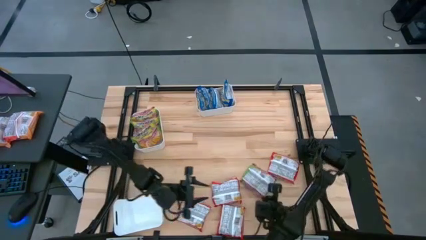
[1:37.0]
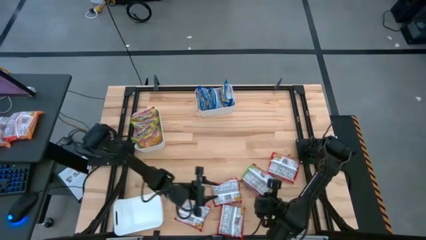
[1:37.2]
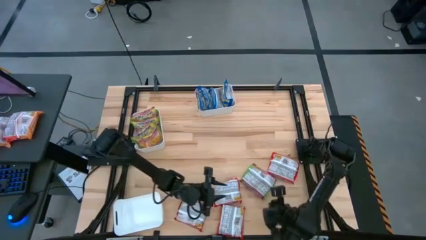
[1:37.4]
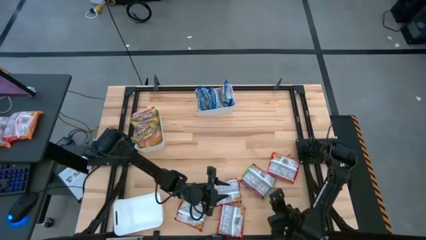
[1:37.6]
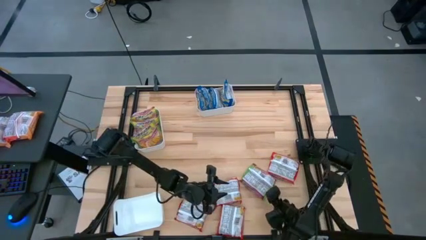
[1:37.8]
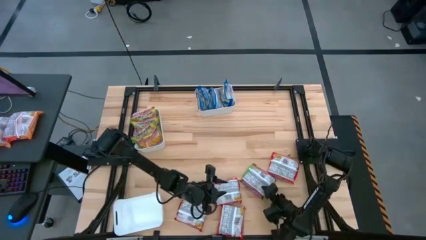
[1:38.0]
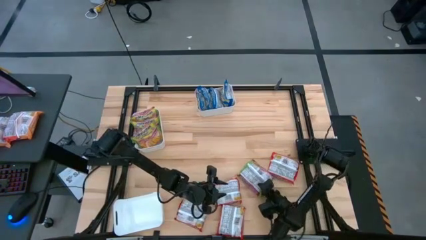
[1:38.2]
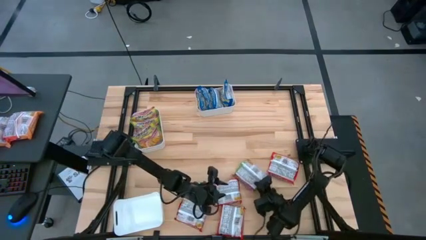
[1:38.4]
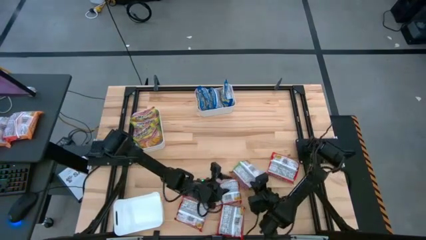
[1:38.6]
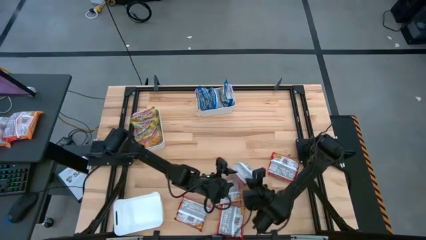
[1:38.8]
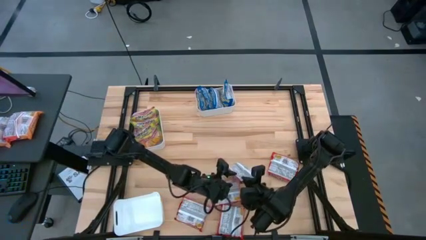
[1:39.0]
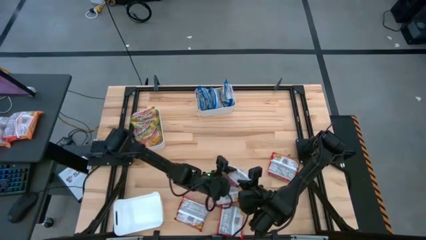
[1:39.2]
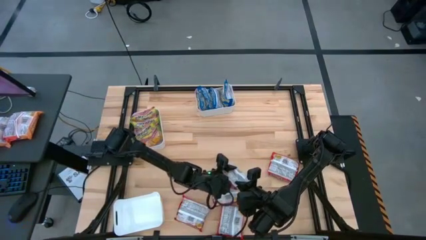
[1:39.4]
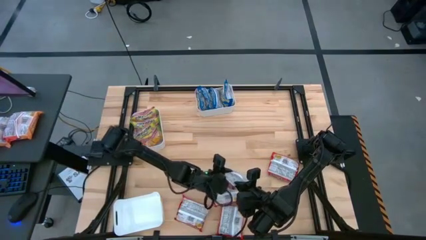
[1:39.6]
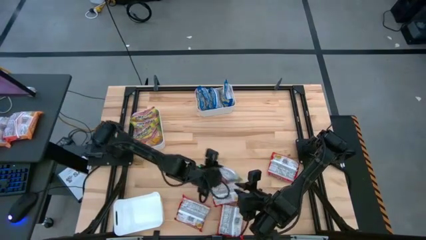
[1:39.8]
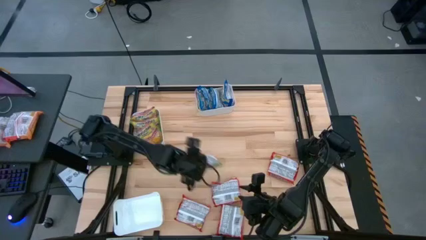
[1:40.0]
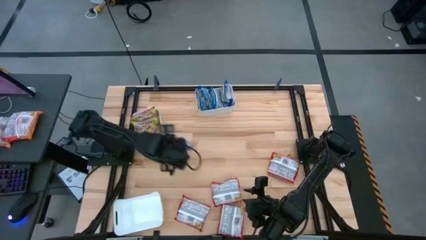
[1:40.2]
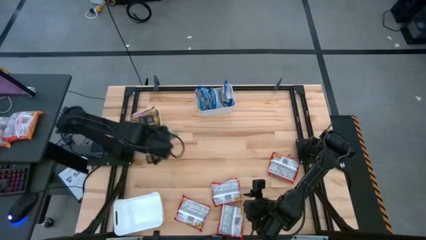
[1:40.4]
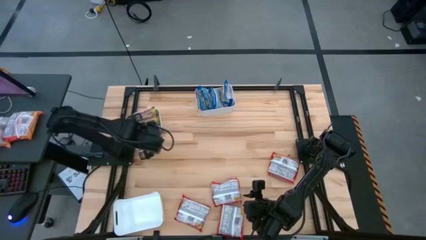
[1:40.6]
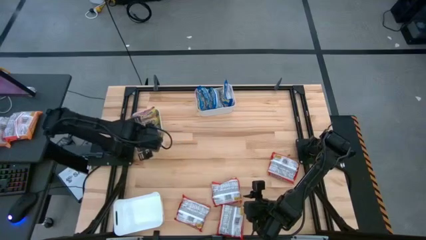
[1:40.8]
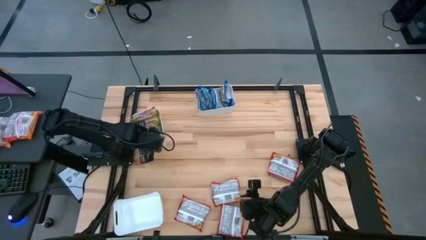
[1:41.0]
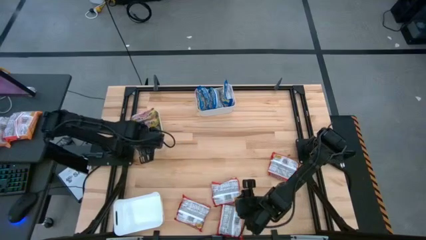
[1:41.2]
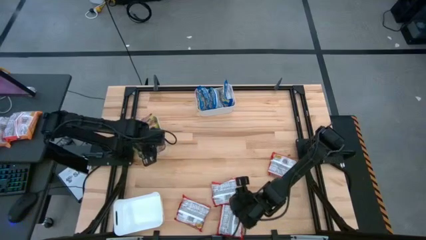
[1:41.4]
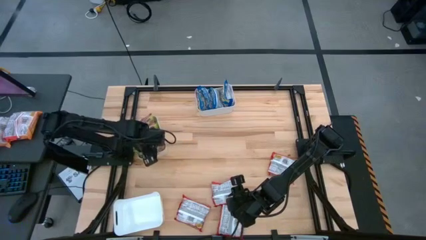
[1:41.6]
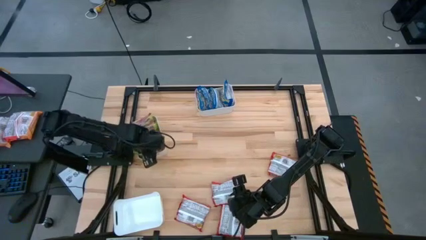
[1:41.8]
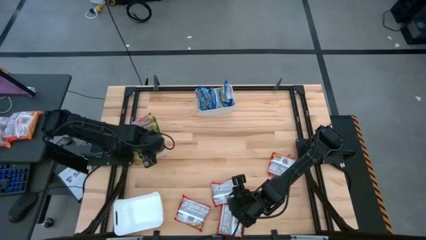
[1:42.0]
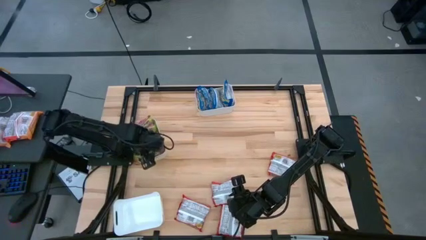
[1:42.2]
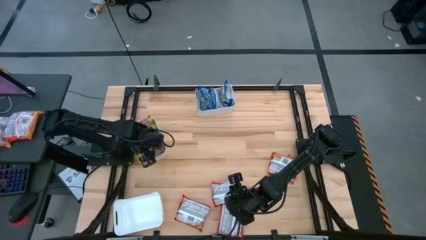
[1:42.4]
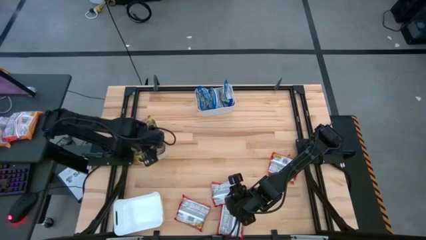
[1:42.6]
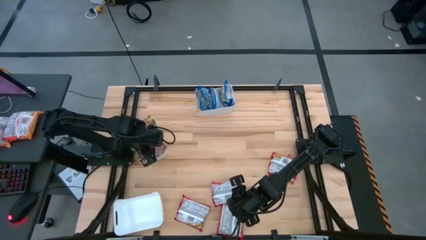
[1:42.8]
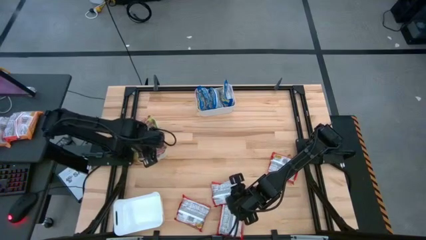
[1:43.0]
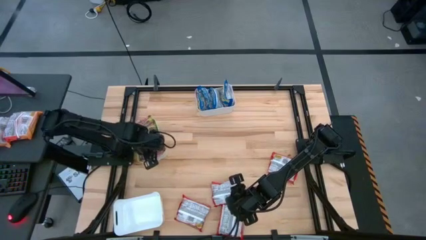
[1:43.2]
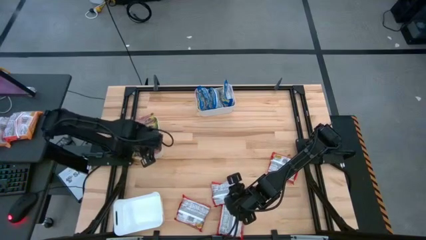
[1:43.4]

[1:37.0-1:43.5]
Task: Sort Maruchan noodles
Put the green noodle pack into the middle white bin

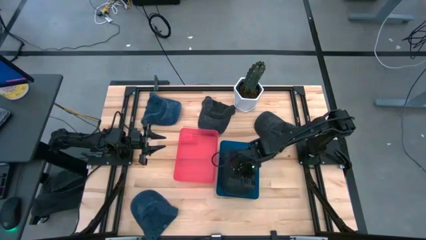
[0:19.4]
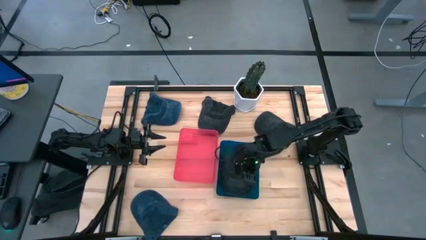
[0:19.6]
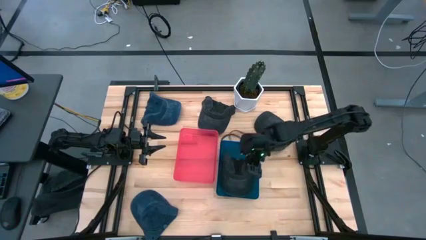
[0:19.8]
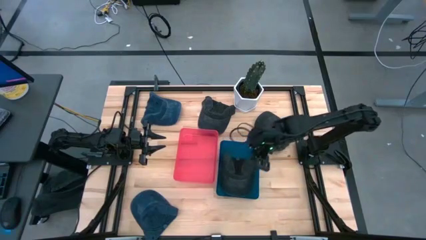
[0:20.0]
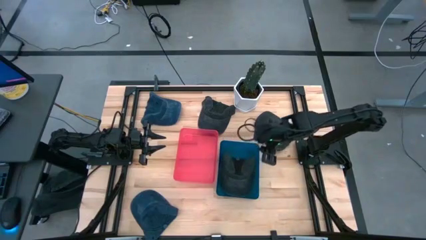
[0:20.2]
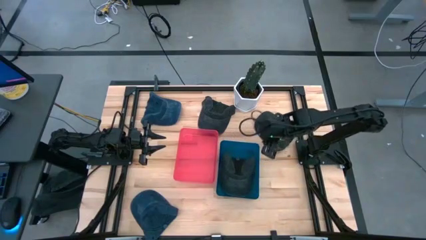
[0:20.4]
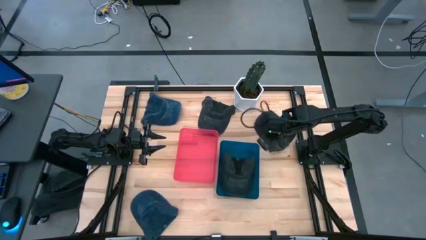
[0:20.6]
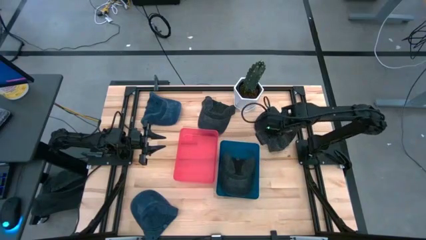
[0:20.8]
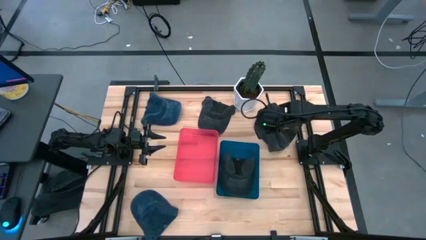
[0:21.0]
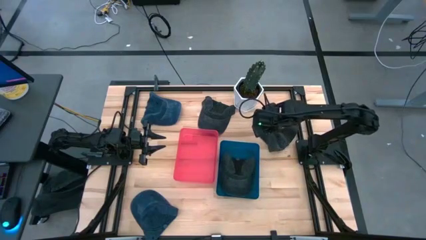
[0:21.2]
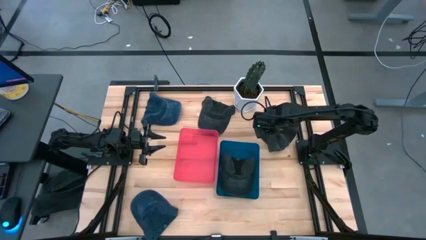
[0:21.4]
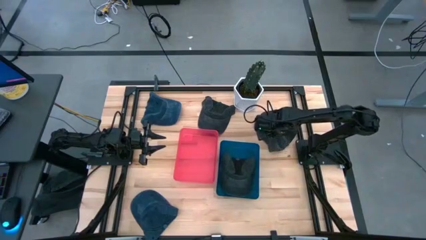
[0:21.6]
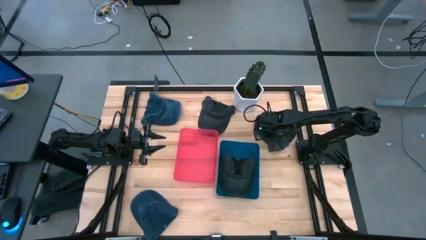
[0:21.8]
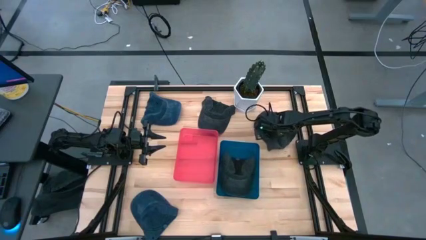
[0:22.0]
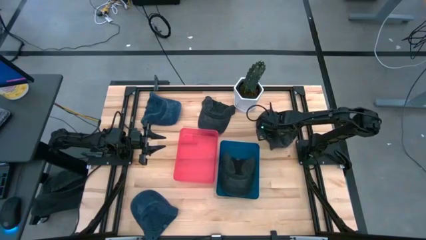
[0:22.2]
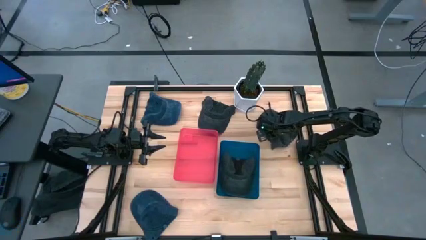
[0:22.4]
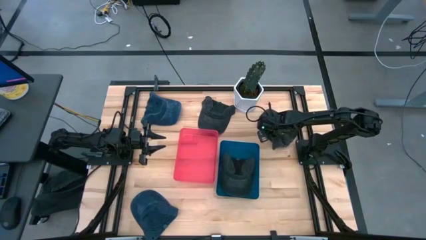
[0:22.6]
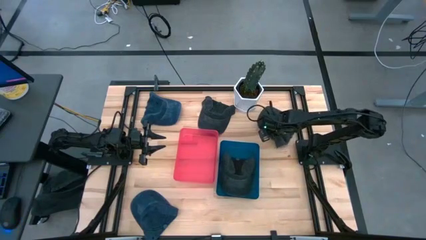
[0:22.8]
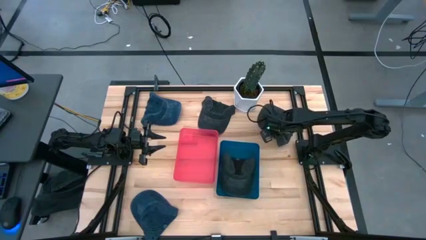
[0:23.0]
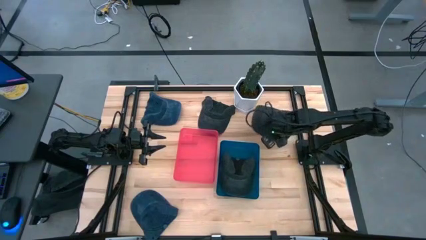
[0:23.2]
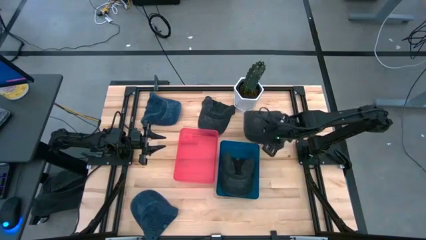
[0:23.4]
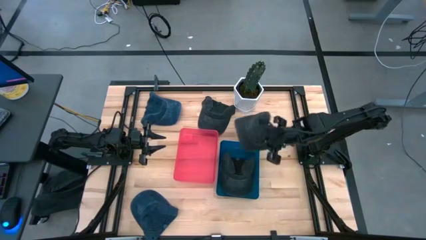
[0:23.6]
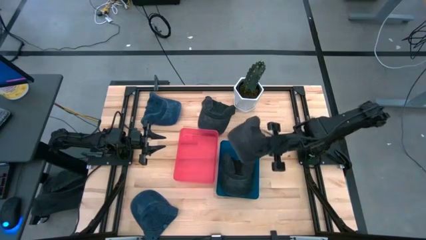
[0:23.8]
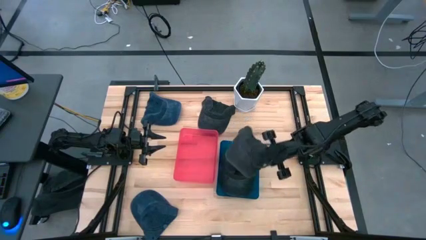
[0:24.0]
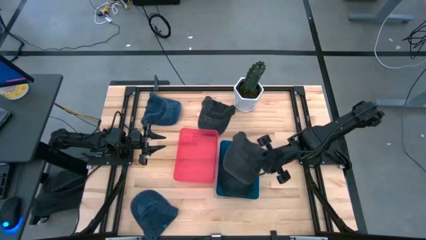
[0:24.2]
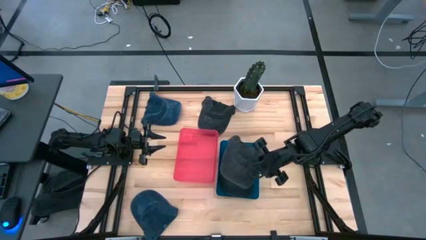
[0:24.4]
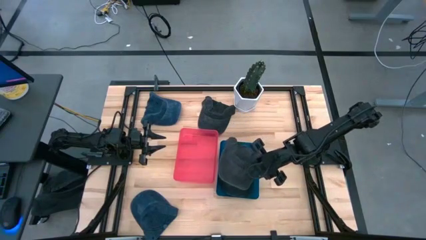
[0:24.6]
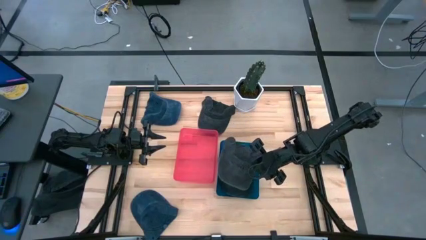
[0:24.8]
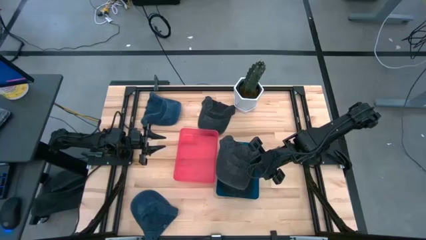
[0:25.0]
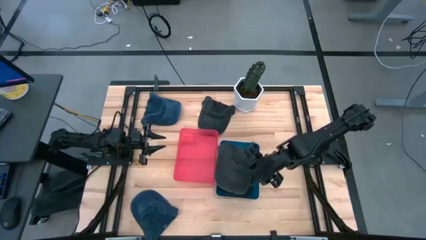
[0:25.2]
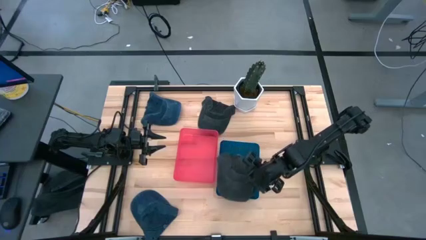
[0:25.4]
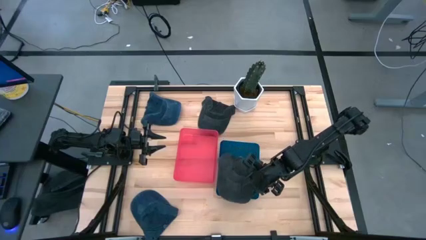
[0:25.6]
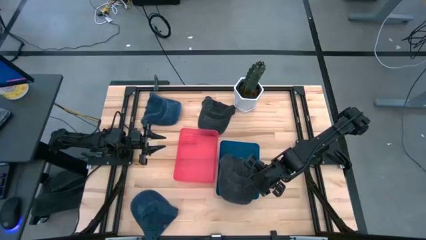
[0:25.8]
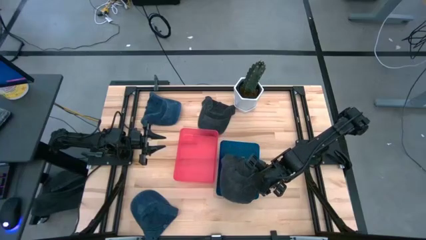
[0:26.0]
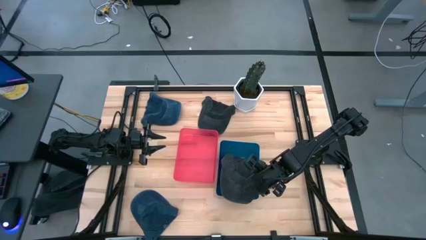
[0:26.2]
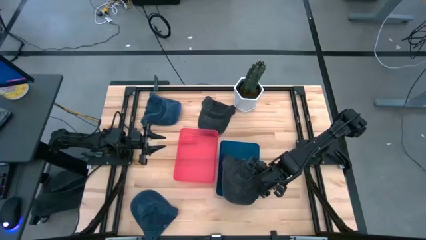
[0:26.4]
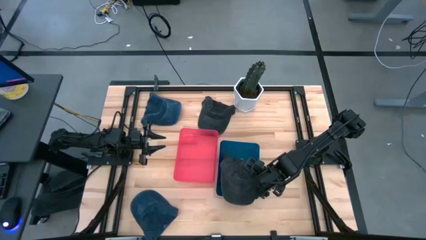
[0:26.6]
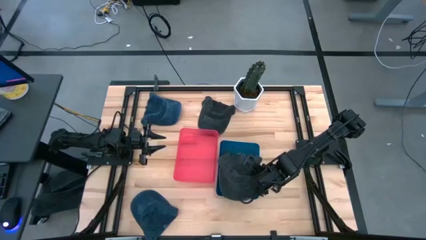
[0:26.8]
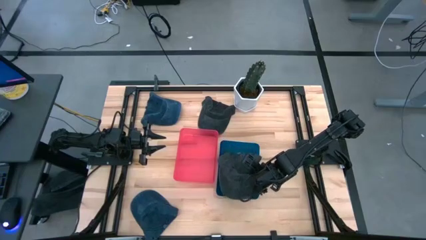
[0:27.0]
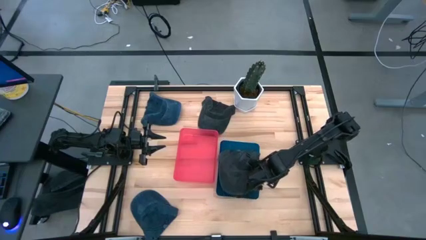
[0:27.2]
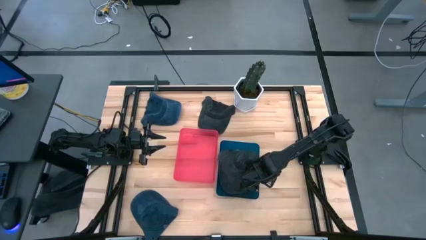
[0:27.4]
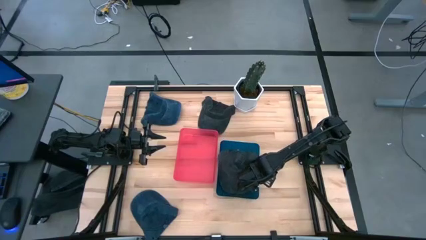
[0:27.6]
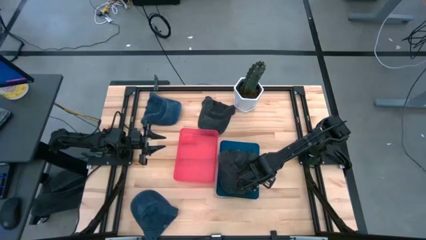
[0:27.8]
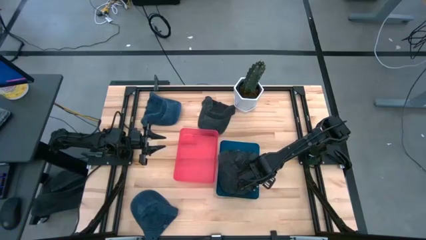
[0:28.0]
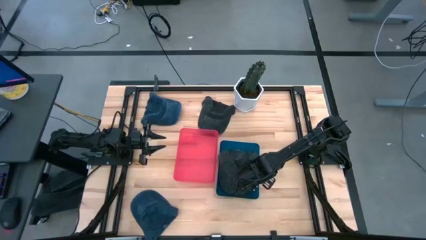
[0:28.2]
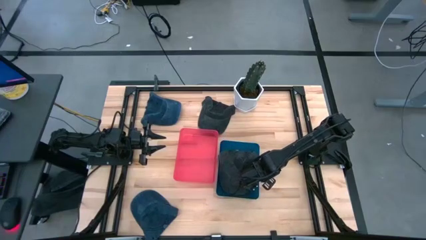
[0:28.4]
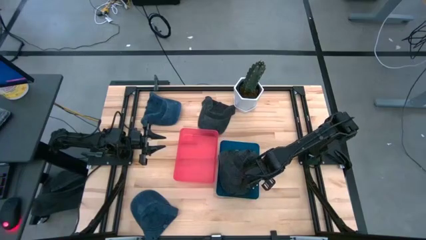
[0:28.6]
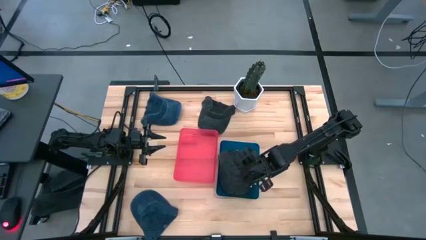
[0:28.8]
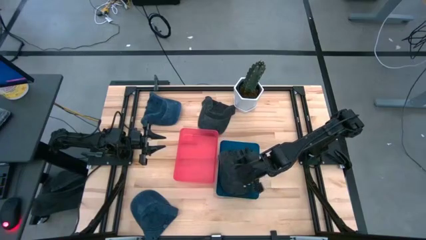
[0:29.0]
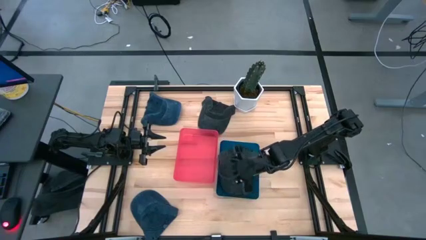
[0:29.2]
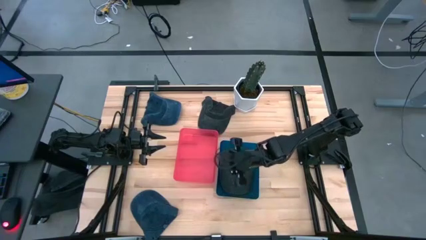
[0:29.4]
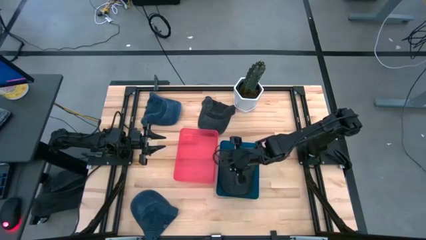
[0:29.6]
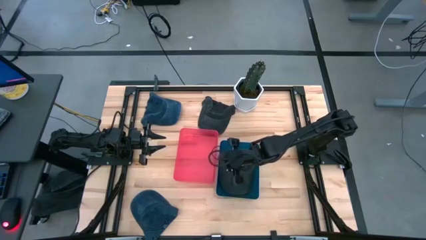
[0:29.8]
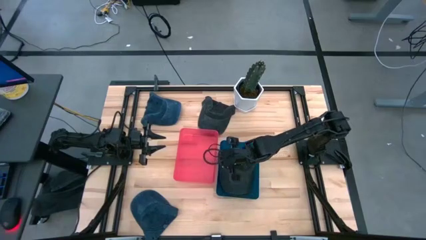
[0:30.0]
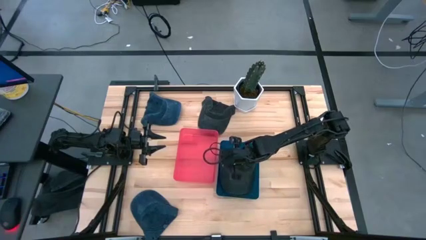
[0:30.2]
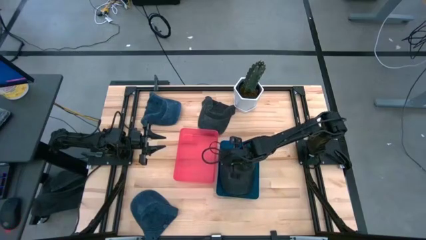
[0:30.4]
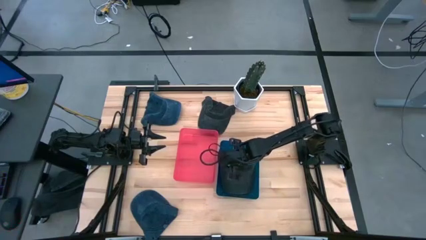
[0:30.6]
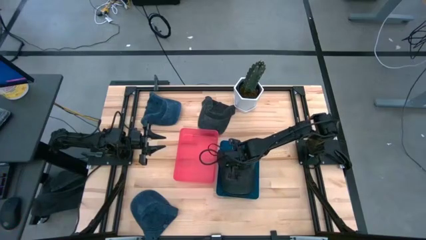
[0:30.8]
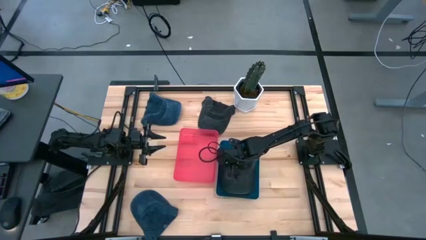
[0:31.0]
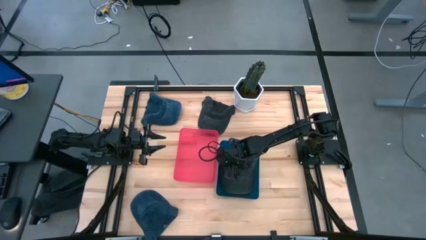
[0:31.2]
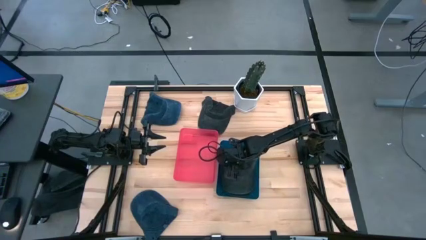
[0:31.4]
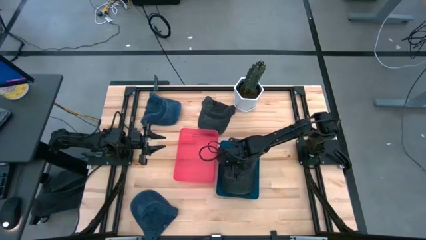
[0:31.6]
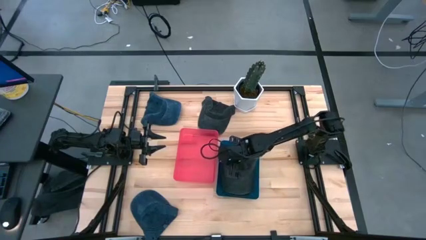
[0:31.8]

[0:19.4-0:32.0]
Task: Pick & Place hat
Put the right black cap into the blue bin
